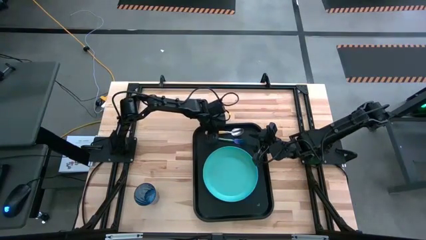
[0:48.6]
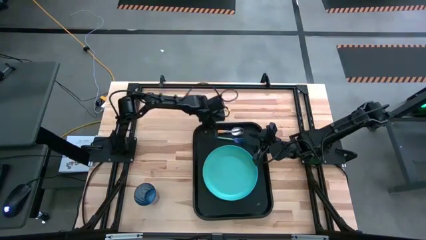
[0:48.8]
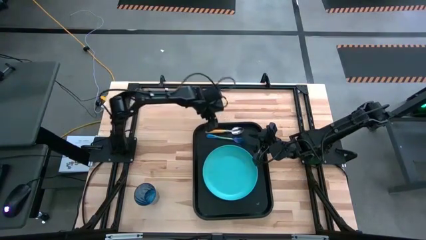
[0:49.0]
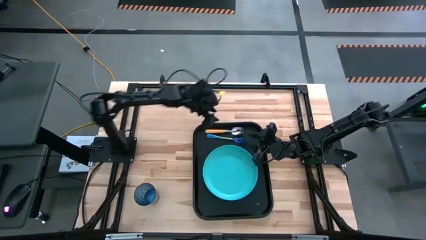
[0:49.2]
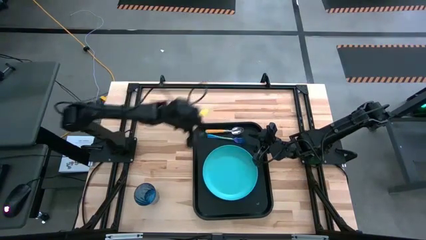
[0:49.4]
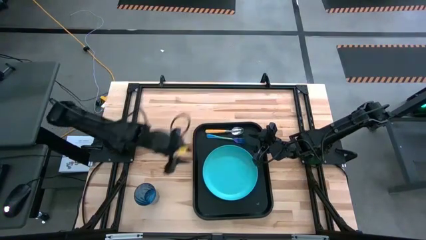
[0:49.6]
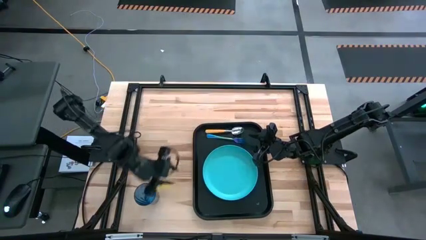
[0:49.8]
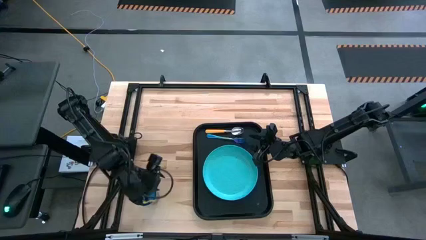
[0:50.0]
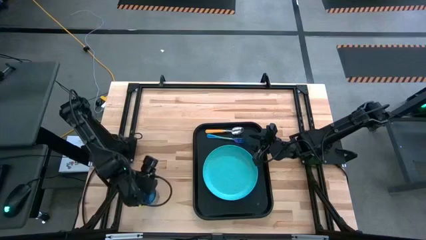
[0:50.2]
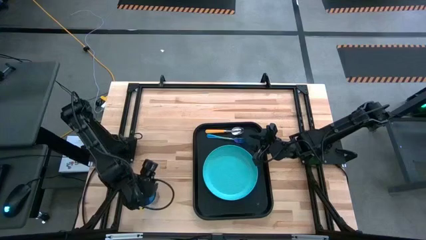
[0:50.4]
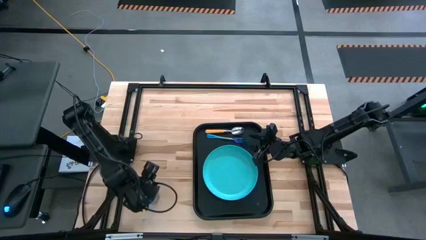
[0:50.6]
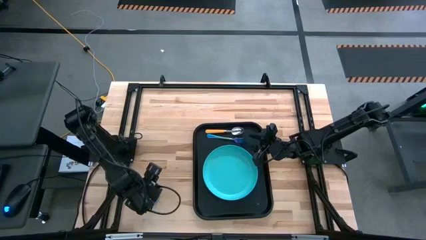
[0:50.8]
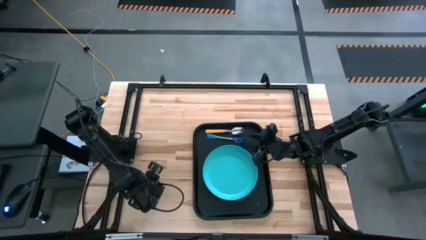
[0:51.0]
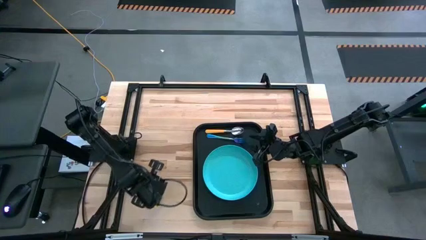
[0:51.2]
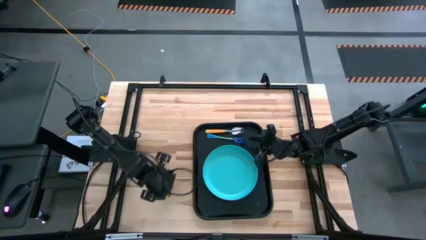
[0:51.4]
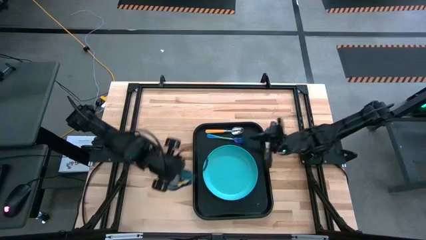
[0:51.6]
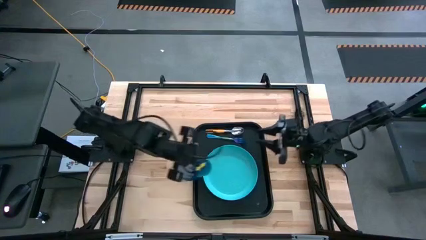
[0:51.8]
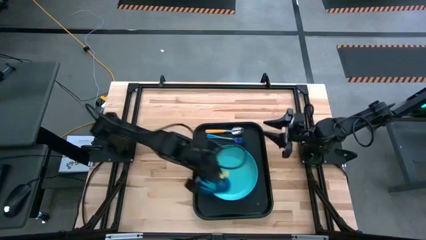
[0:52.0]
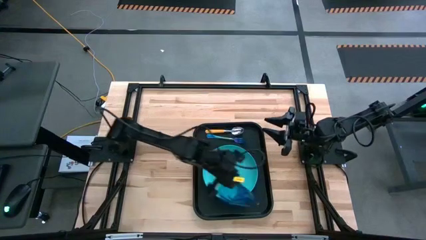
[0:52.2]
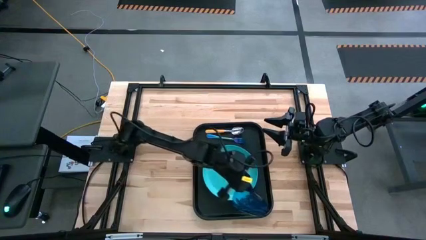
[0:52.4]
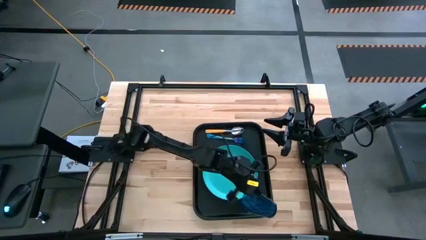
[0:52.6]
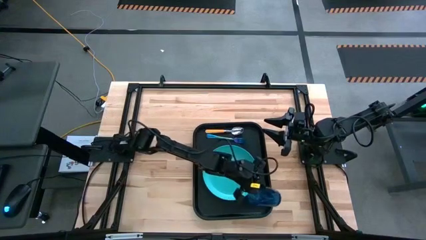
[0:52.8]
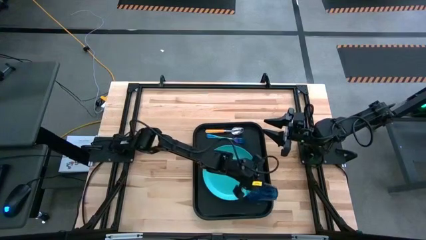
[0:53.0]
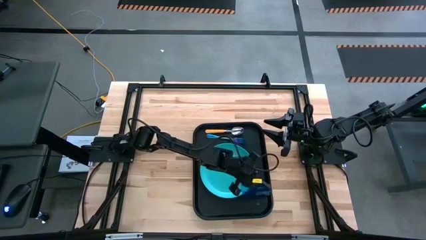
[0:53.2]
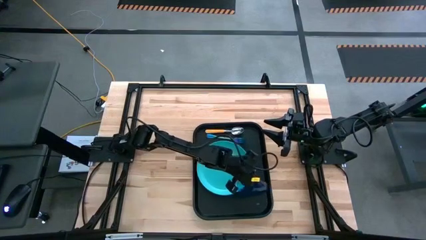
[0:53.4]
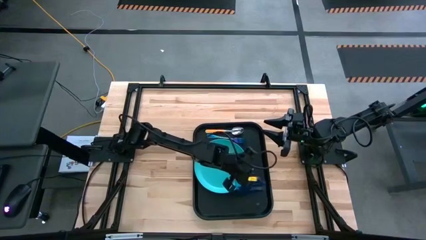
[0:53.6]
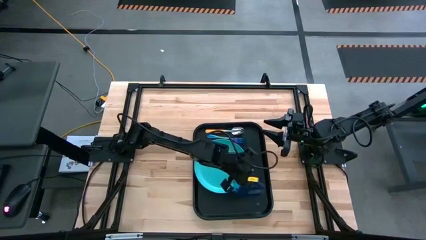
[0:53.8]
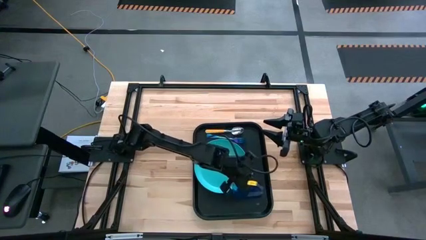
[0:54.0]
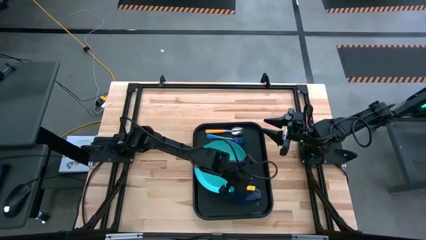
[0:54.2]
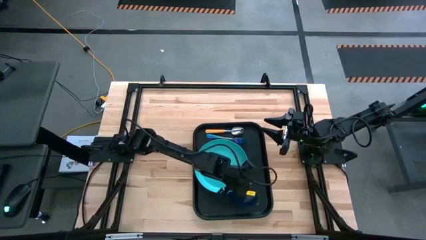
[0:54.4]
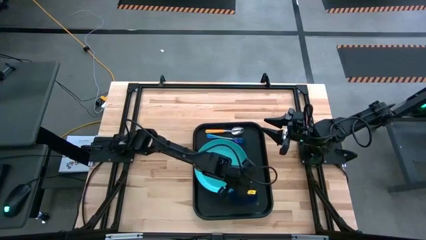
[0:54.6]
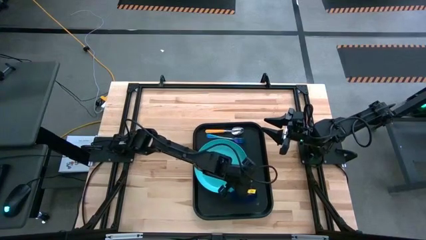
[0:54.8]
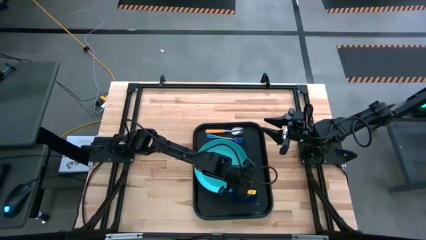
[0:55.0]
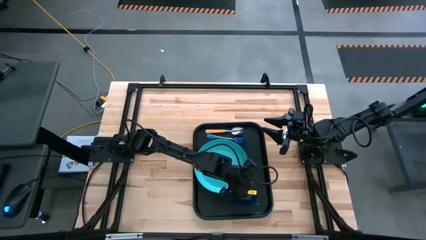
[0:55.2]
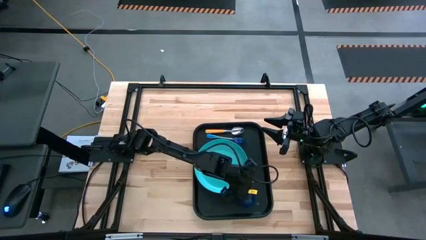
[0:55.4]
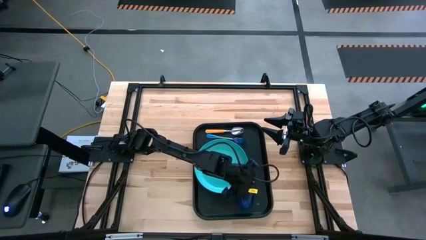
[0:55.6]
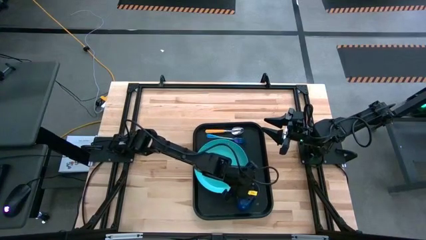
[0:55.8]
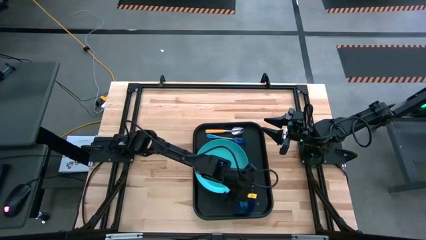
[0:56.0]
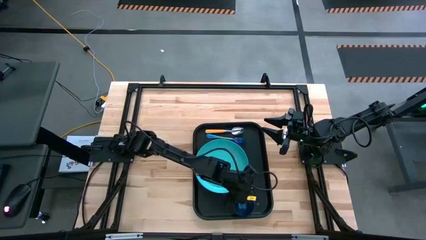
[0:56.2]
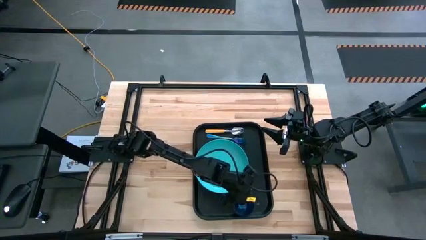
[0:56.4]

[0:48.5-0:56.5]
Task: Pick and place plate/cup/fork/spoon on tray
Put the blue cup to the top right of the blue plate on the black tray

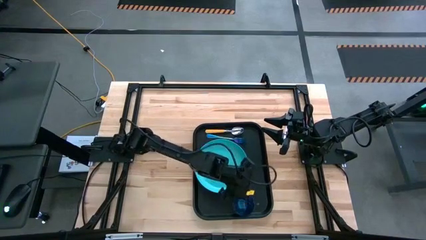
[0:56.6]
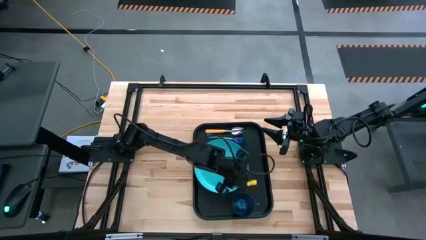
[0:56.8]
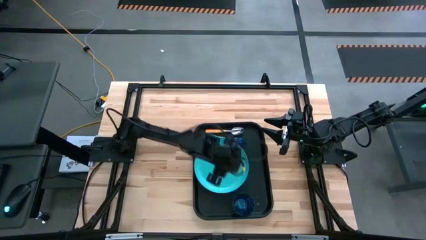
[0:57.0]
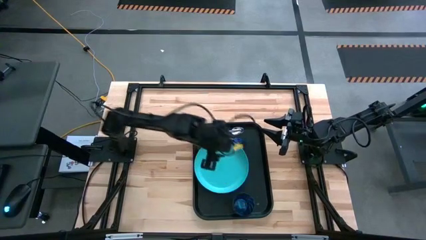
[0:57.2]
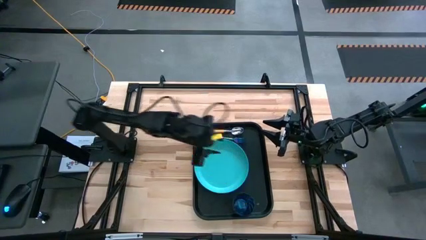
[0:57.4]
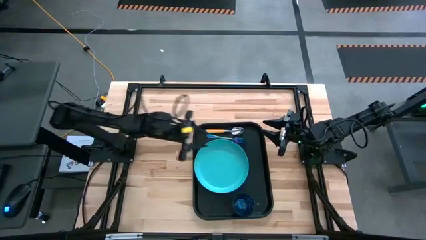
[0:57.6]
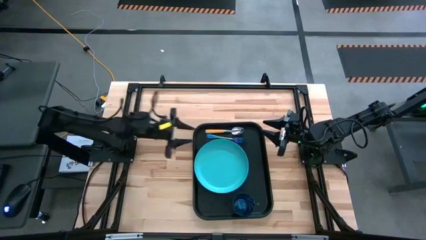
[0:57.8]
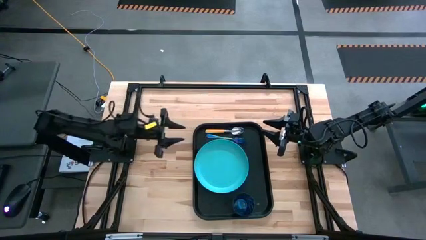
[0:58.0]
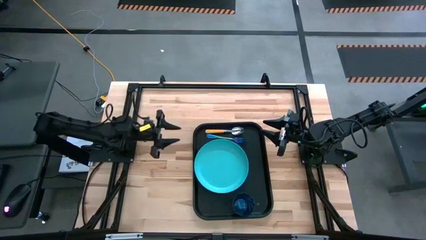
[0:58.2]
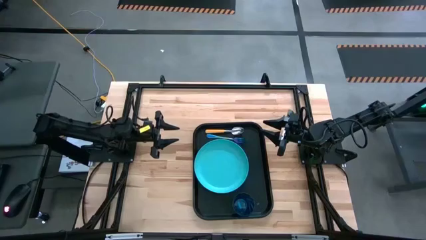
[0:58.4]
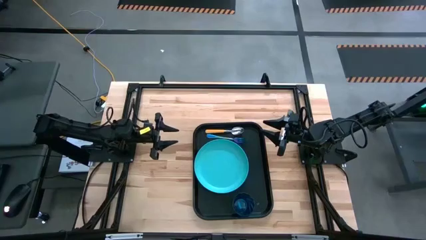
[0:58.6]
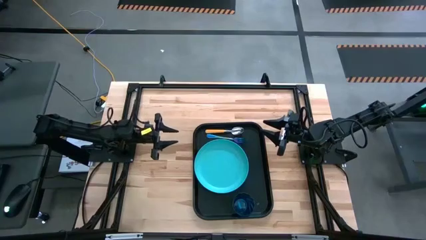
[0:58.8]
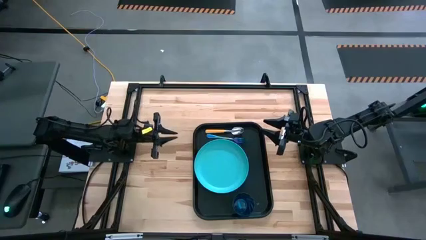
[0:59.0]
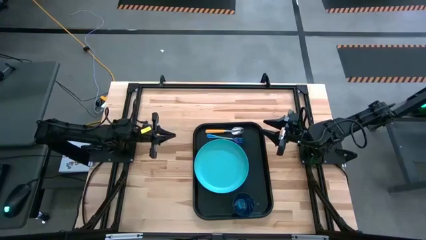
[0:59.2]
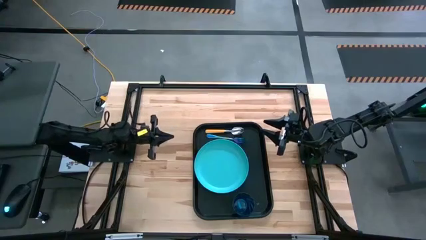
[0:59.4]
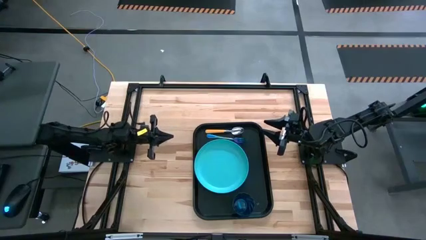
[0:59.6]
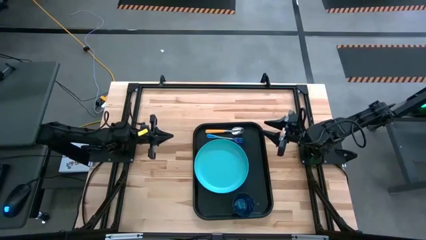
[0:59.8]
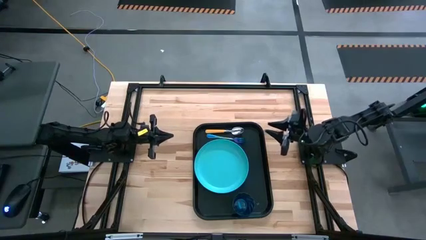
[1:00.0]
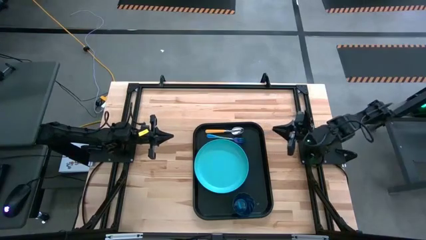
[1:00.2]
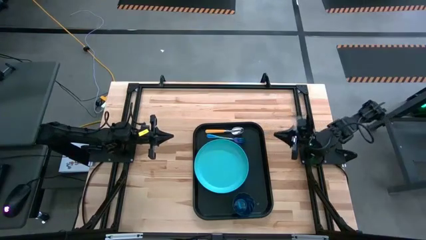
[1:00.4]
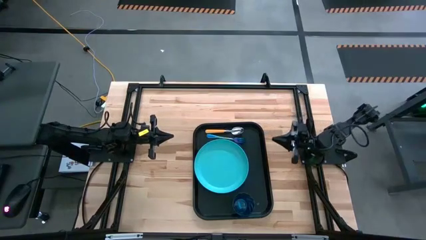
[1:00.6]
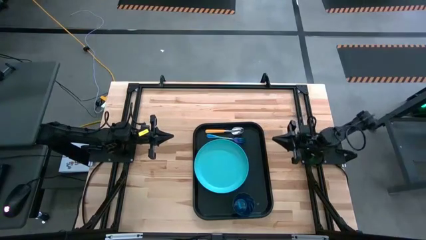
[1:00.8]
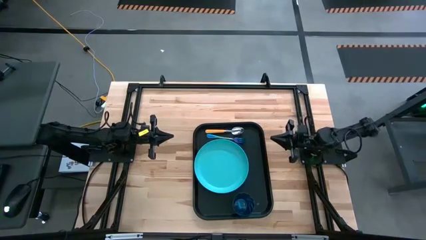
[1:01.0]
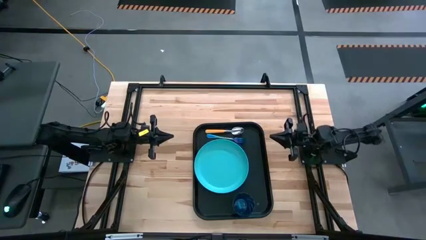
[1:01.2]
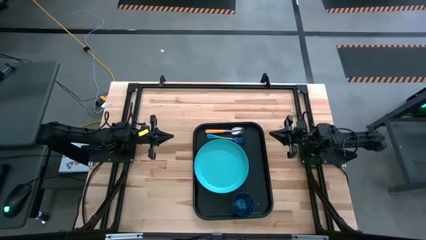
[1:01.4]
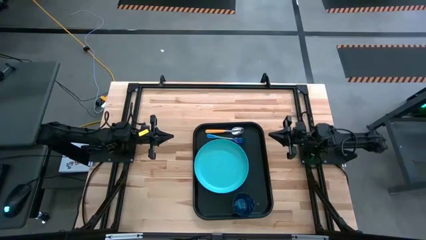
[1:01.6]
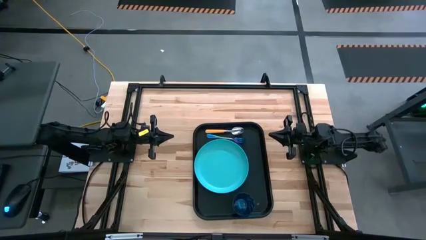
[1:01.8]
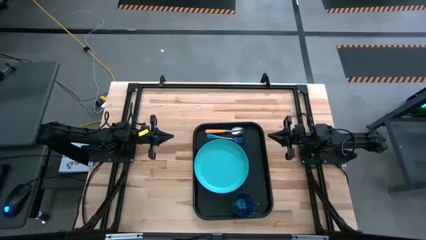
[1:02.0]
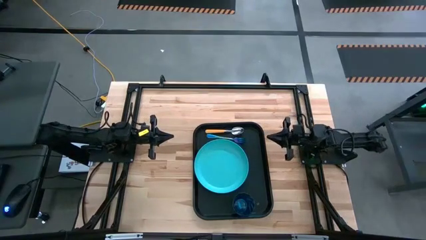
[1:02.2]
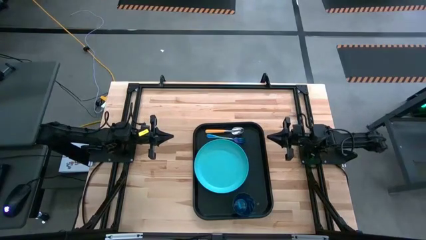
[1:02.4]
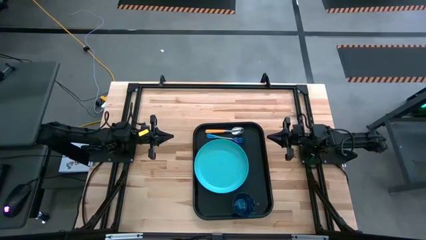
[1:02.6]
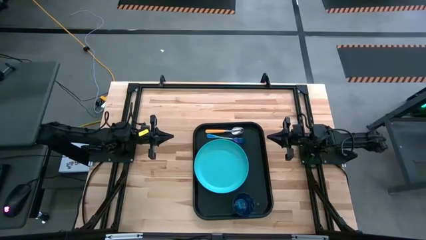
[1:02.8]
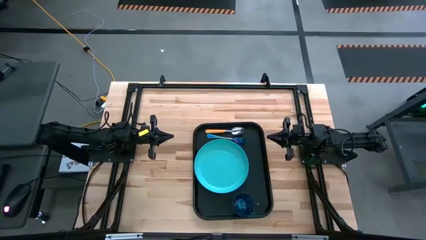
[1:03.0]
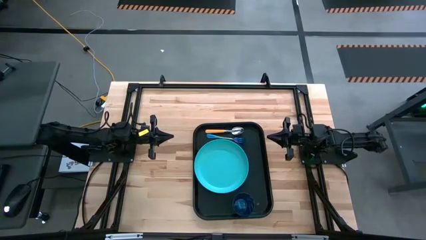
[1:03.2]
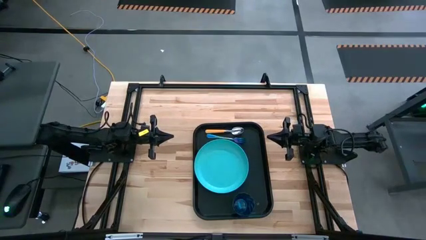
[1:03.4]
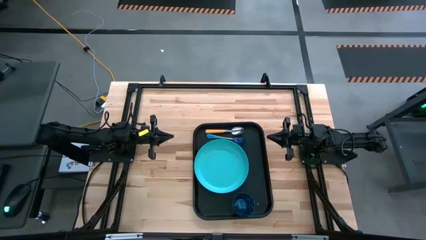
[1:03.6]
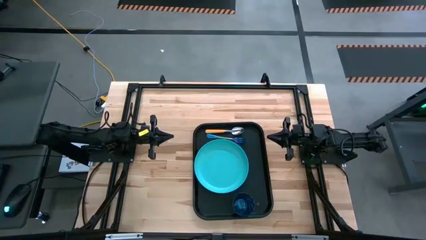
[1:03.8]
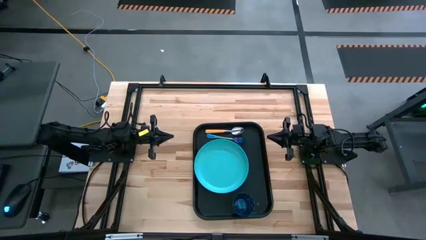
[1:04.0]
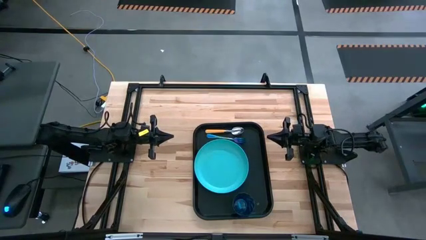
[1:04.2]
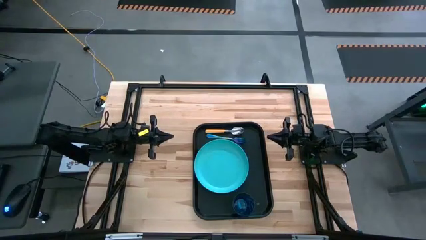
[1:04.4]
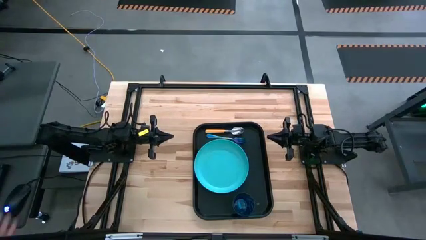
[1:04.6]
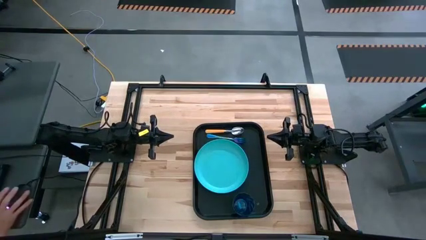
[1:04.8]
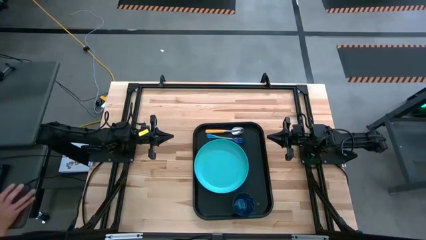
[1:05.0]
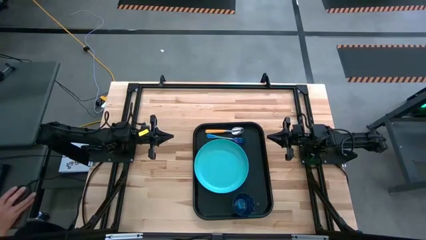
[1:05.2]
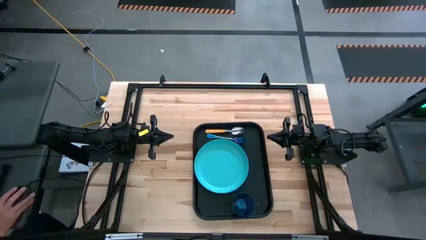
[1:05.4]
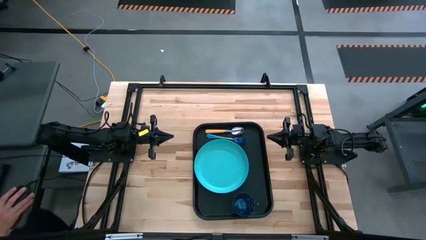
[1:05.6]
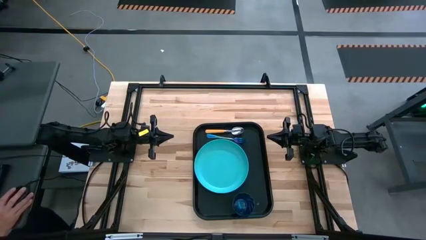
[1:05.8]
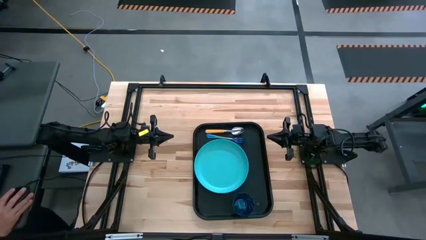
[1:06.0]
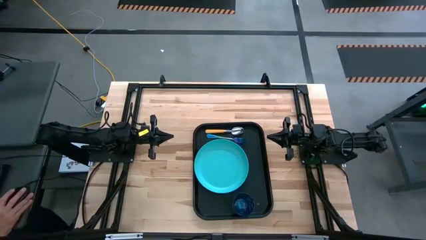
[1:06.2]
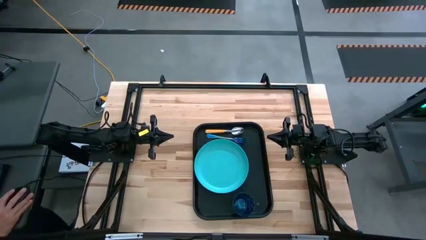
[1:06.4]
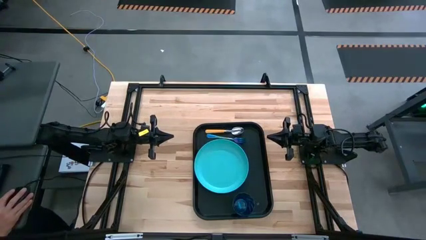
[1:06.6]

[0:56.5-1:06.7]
Return to Home Position
